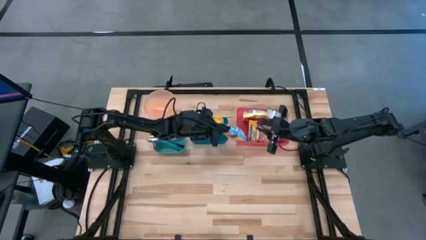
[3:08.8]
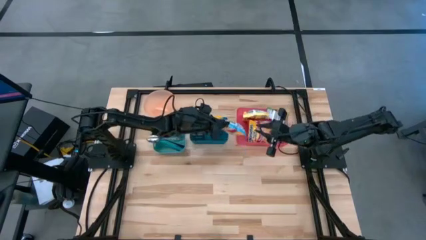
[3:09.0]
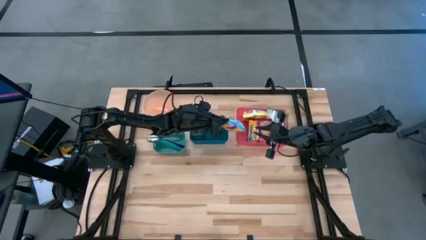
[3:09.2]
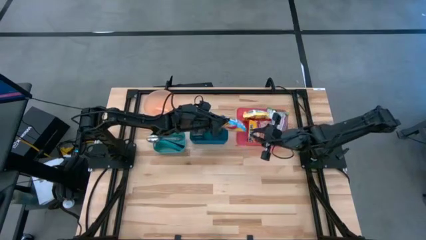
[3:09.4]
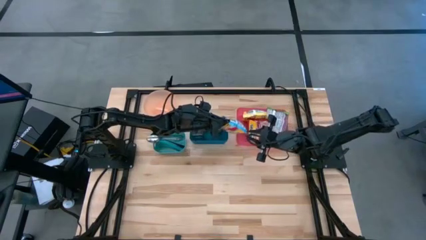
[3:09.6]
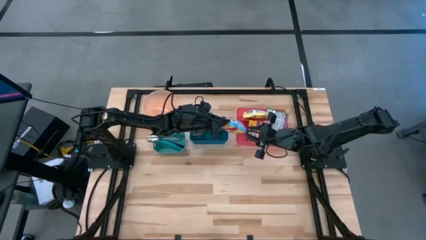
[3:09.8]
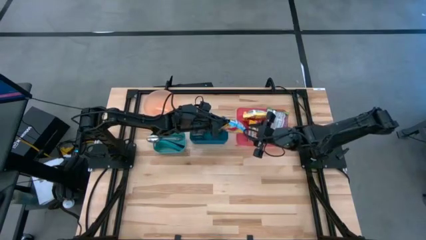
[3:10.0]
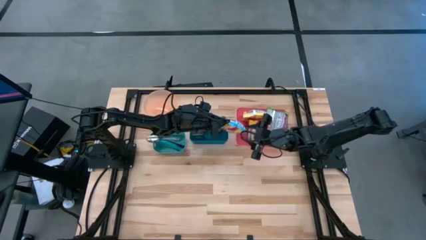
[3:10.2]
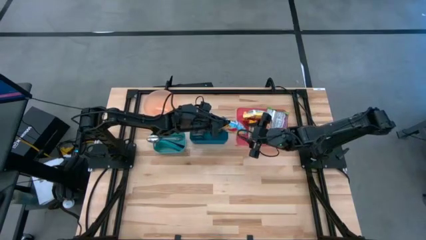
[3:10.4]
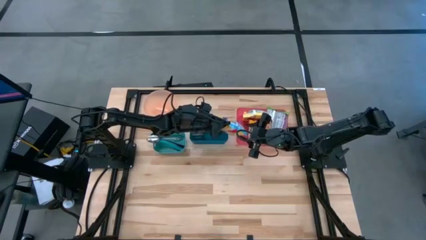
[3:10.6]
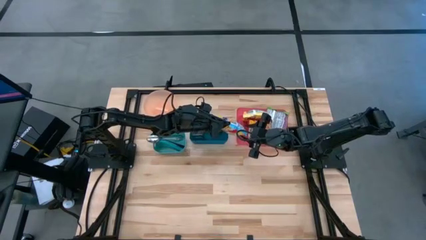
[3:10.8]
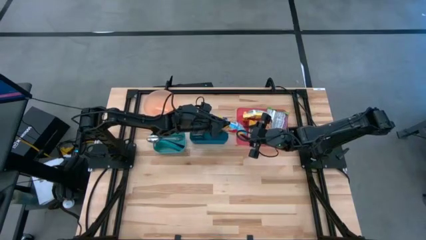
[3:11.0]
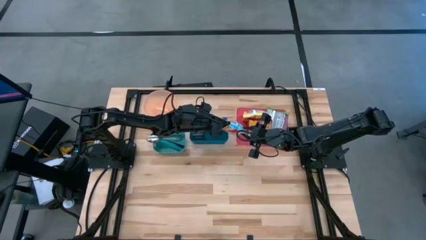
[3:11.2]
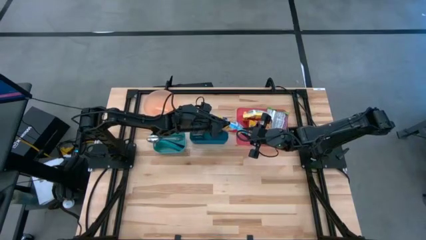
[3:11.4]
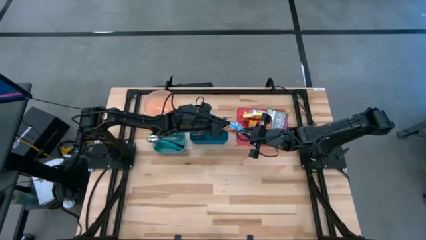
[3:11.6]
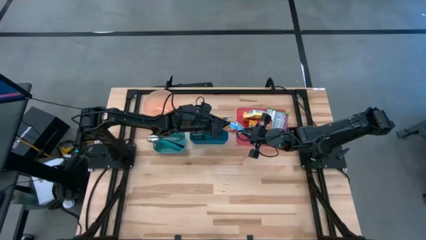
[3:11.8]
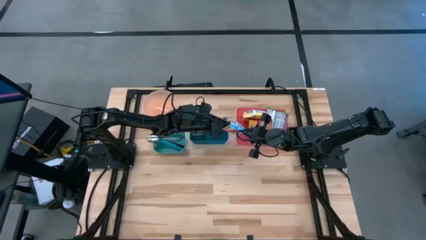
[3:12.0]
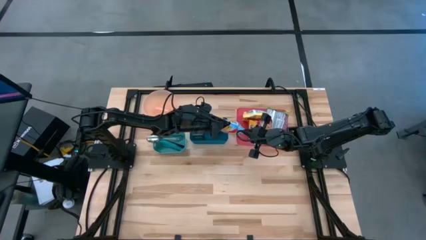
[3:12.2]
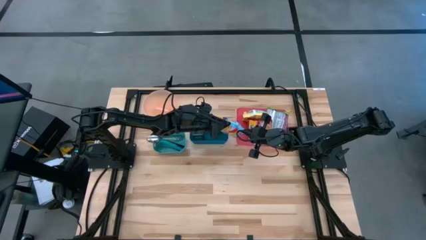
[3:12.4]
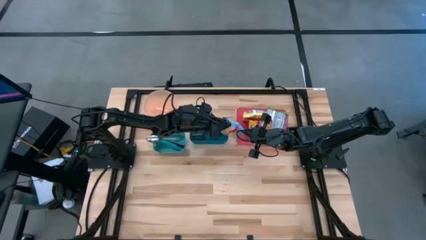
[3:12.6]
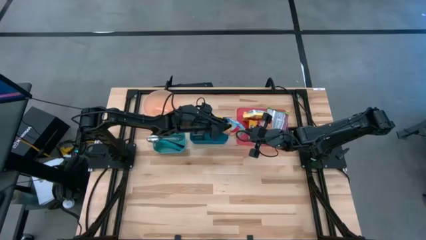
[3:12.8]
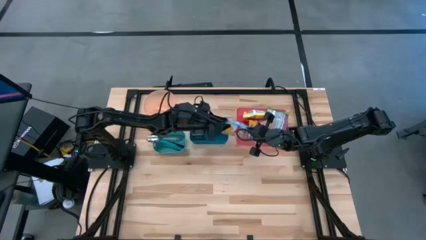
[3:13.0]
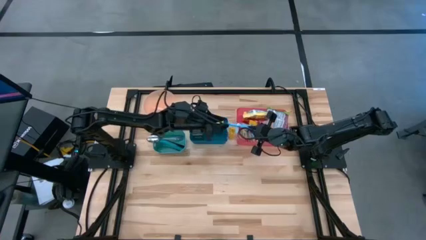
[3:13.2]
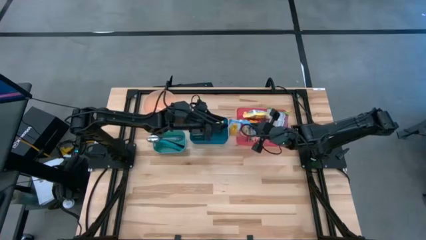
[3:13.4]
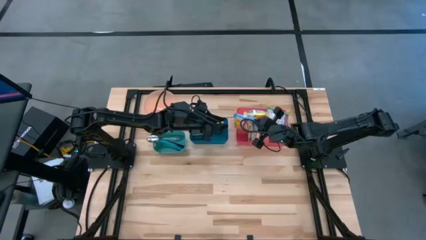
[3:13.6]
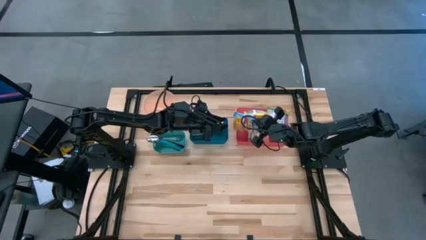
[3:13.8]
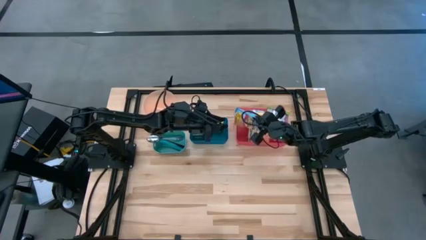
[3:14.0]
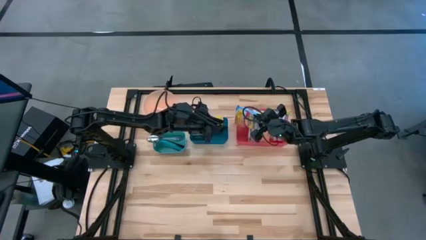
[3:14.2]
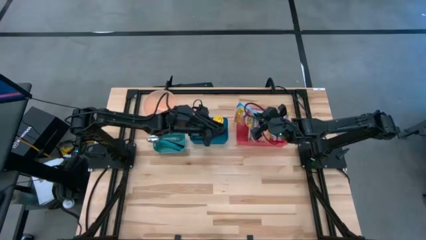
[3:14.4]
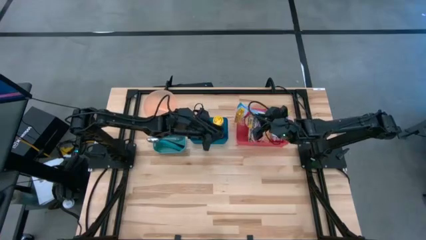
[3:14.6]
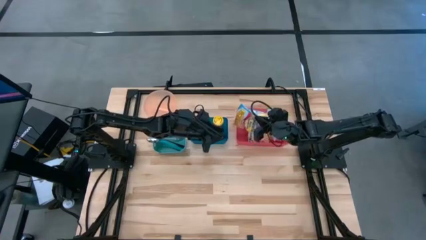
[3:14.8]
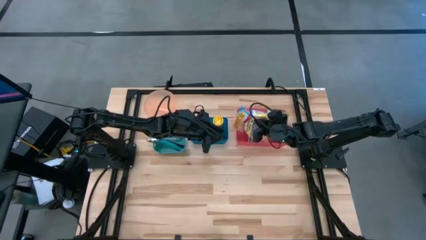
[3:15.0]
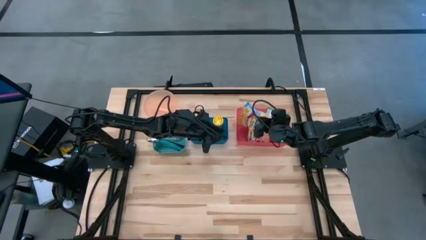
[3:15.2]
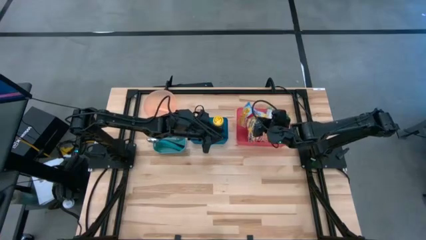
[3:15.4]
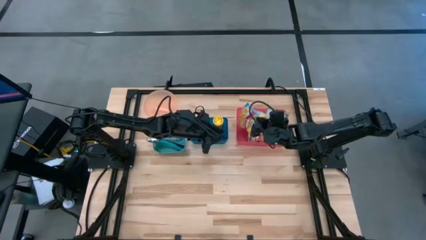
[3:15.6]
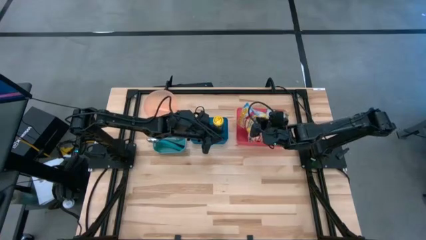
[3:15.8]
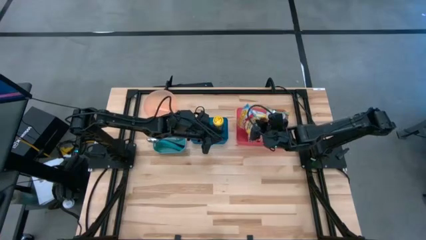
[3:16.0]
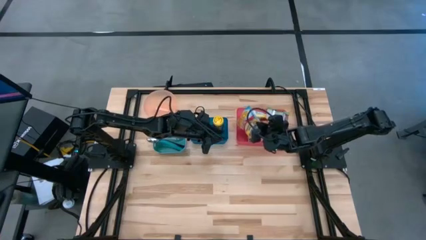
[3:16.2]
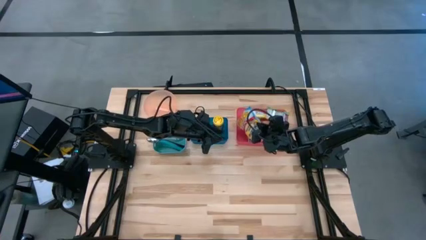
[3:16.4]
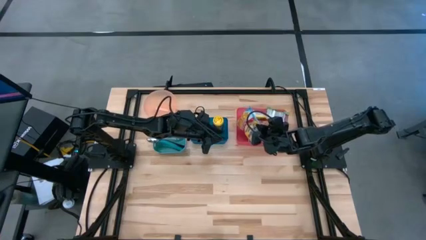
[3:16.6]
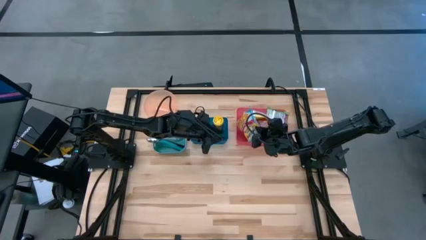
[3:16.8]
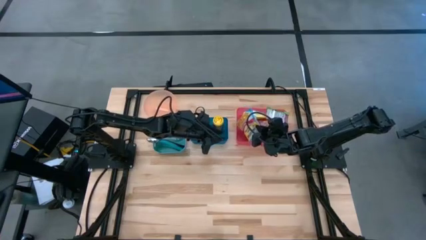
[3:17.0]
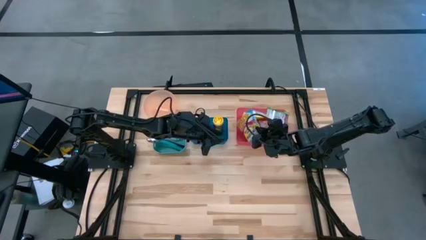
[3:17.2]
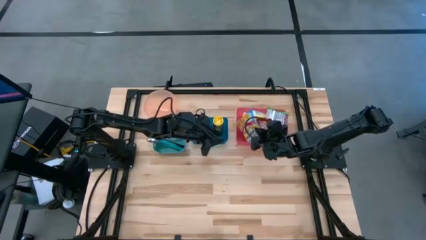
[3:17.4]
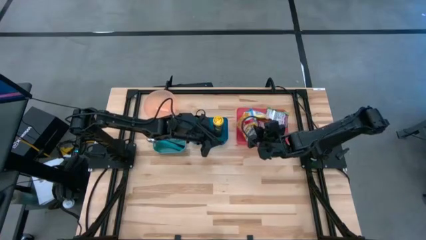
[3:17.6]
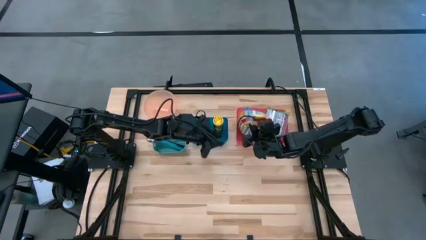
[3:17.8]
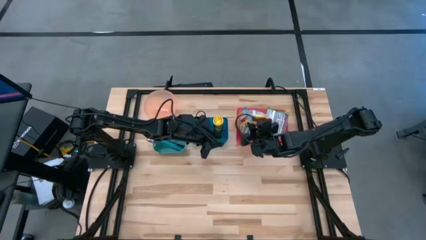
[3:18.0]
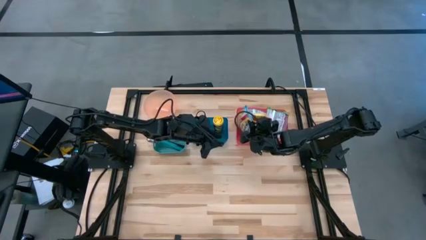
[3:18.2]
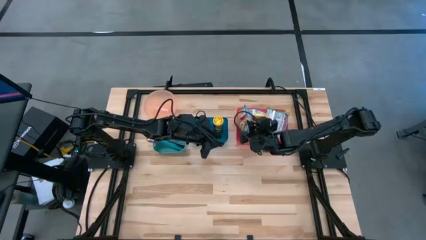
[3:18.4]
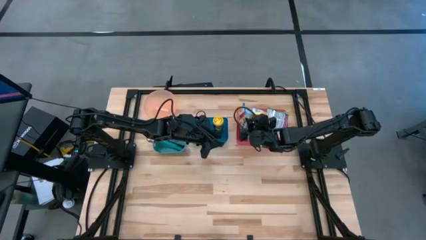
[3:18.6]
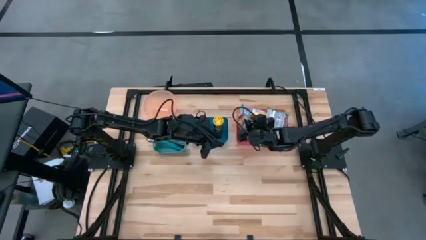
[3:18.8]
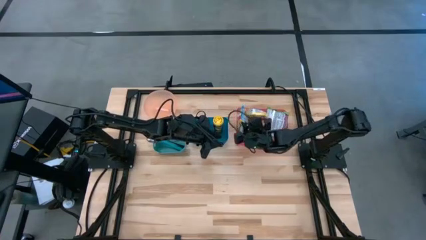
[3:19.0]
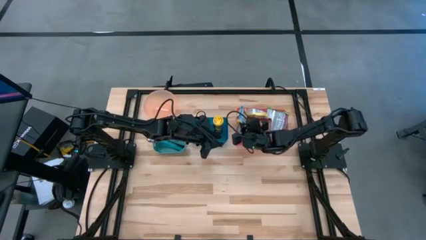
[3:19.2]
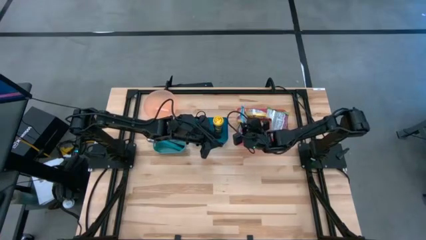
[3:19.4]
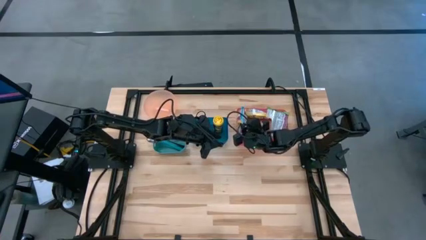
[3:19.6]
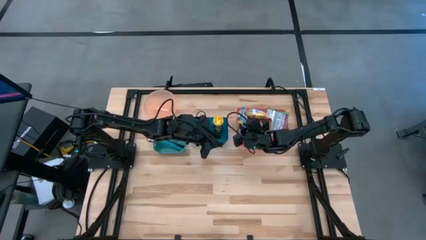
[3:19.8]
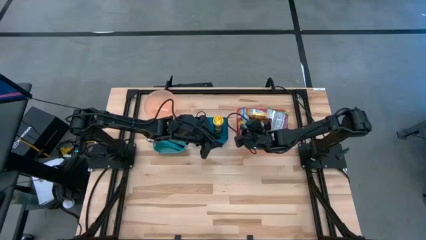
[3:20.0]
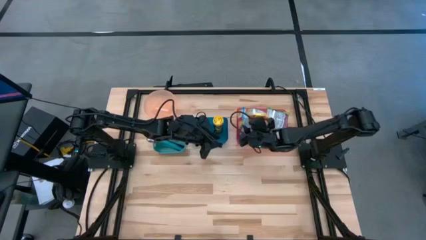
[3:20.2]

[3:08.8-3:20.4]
Task: Pick & Place Food Item
Put the light blue noodle pack into the pink bin

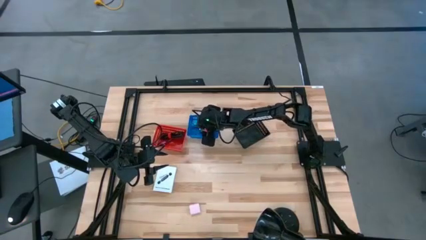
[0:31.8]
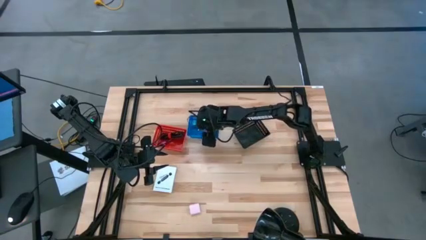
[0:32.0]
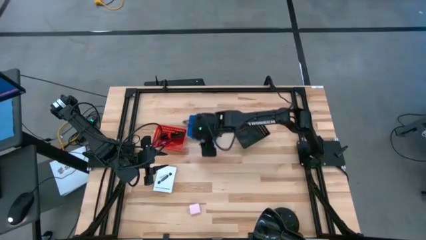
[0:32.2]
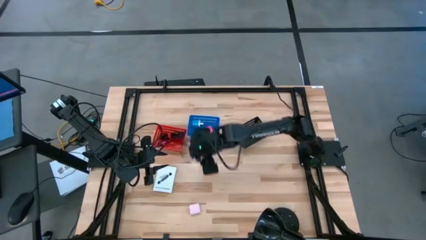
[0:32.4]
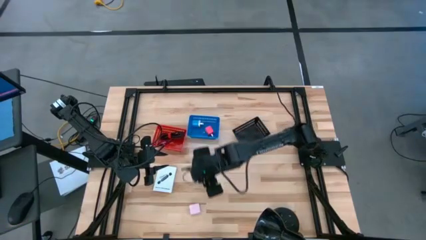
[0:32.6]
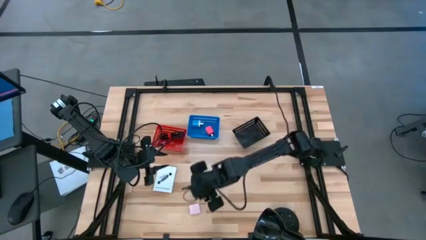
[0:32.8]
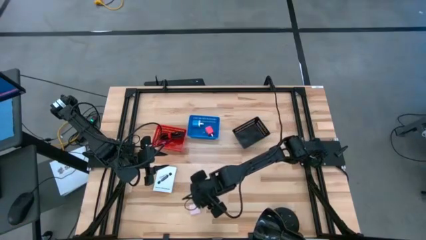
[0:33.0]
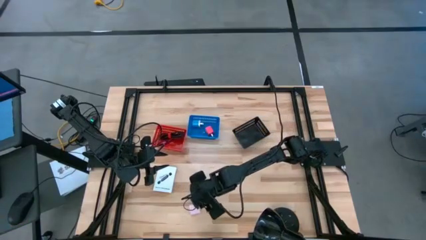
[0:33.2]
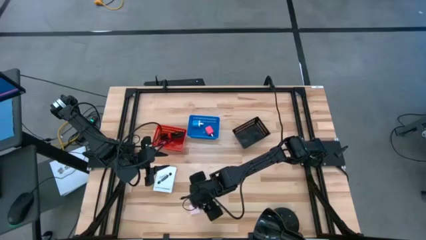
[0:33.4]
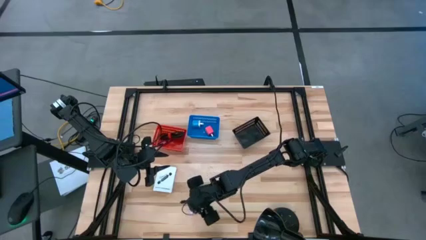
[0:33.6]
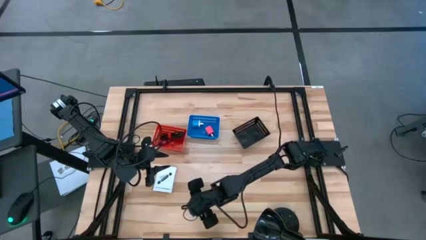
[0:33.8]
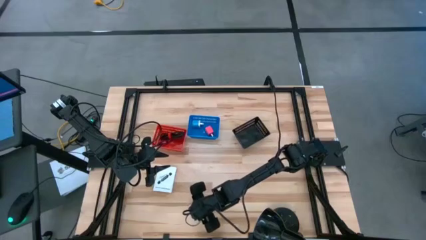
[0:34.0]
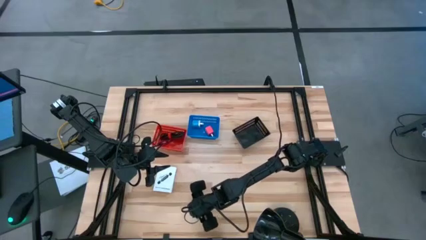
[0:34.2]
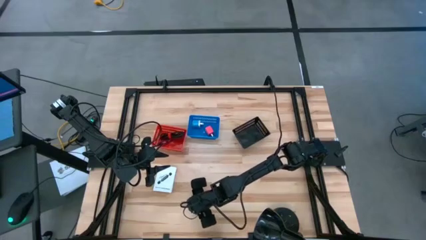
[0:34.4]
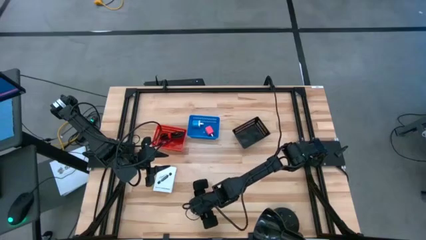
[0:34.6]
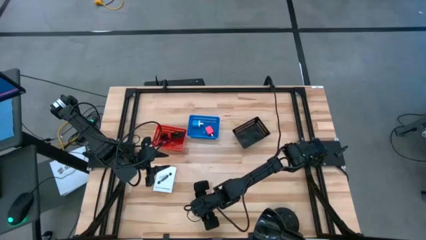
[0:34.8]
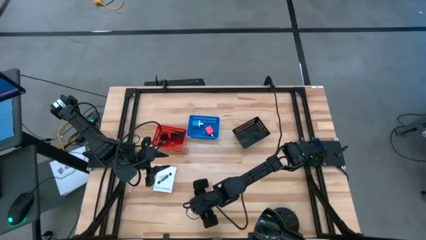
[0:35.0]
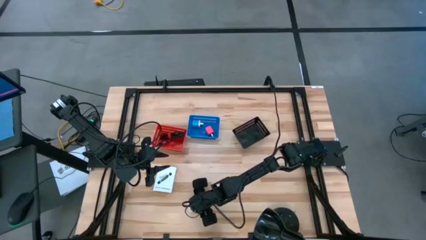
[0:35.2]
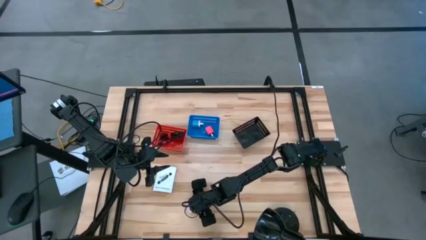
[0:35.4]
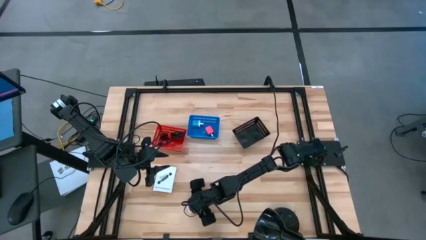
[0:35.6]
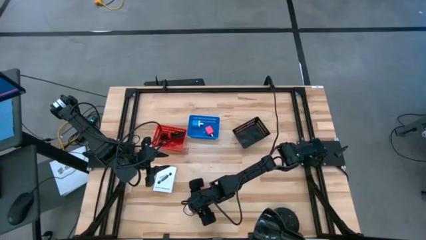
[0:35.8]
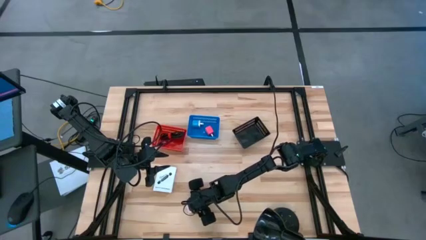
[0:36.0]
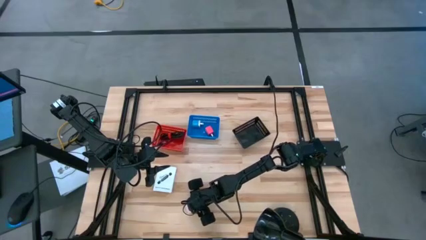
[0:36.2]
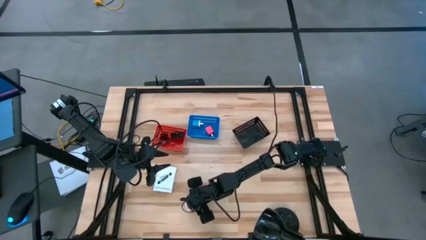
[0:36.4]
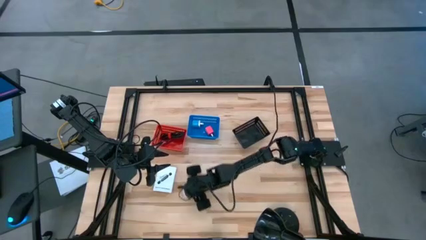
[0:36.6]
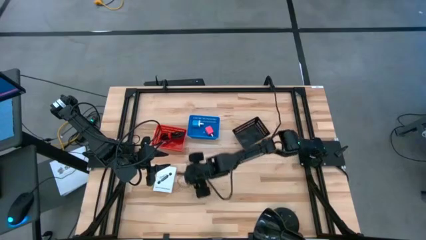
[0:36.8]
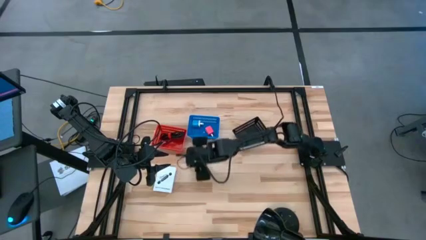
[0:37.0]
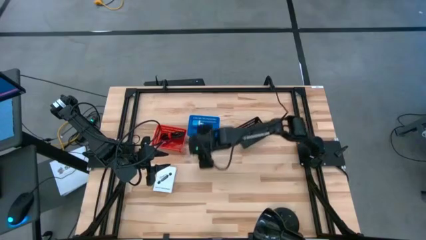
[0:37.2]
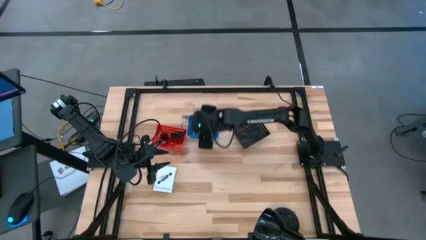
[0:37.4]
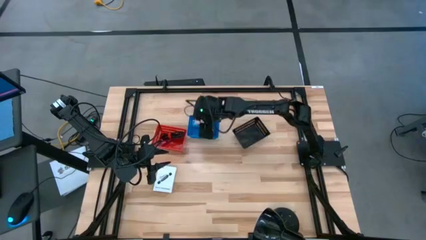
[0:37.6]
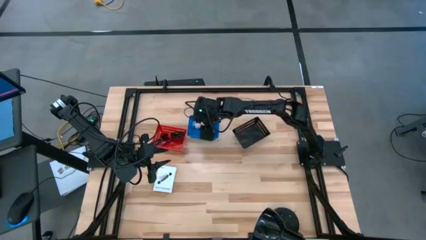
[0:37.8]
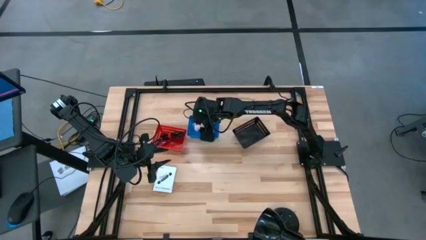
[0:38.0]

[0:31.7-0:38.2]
Task: Pick and place items into bin
Put the white charger adapter into the blue bin
